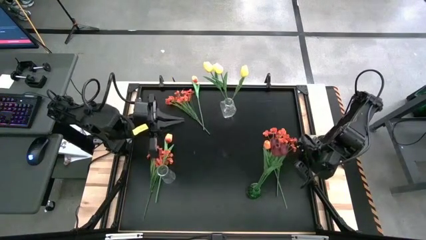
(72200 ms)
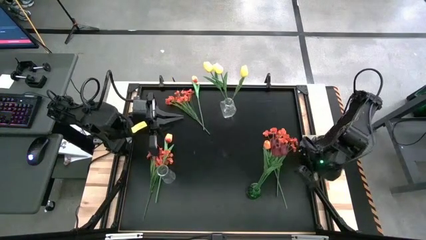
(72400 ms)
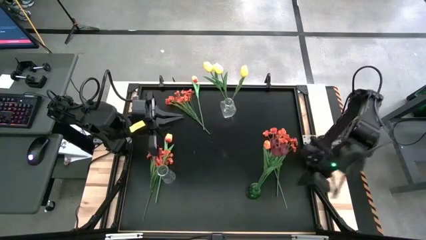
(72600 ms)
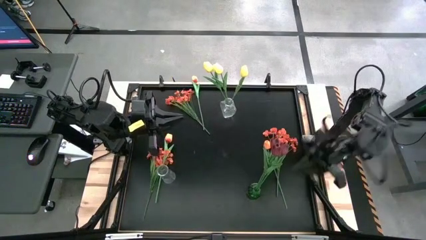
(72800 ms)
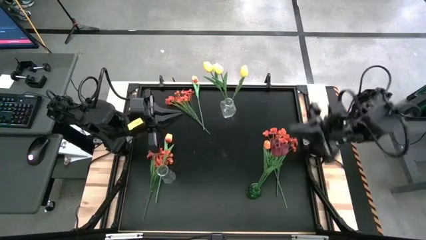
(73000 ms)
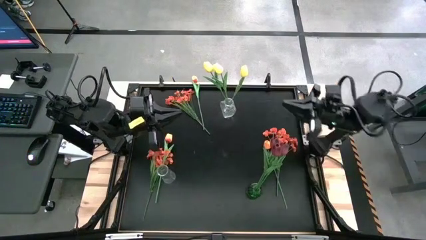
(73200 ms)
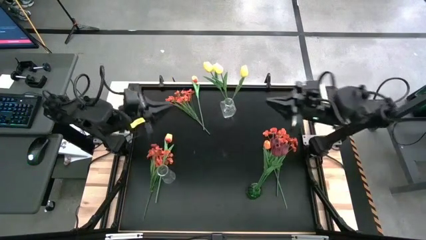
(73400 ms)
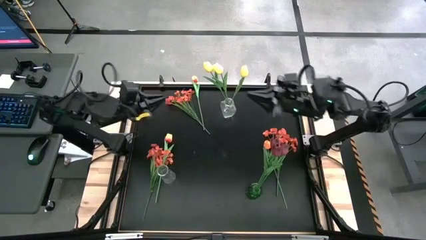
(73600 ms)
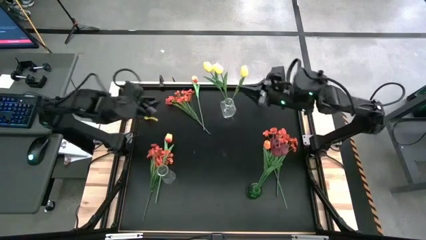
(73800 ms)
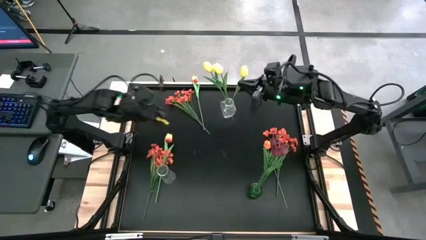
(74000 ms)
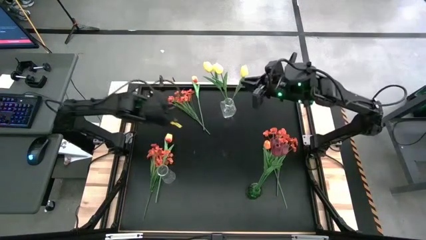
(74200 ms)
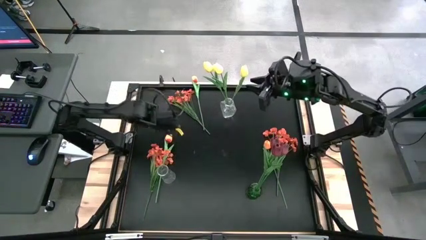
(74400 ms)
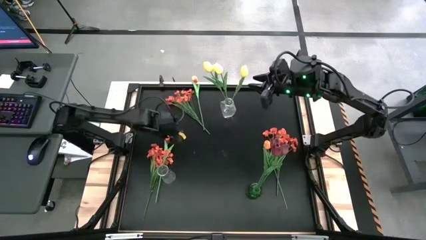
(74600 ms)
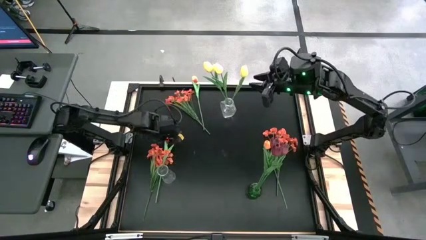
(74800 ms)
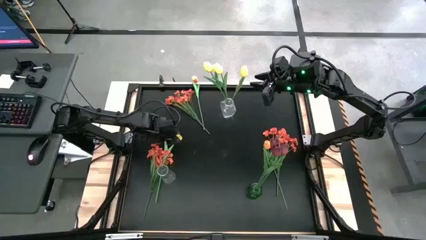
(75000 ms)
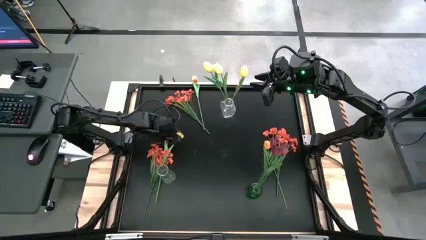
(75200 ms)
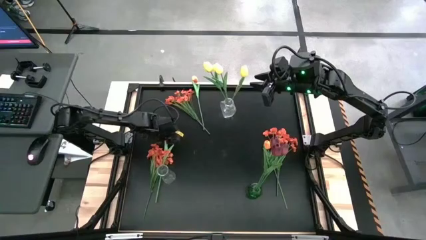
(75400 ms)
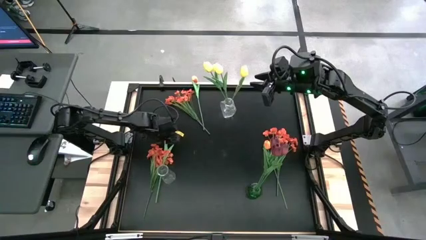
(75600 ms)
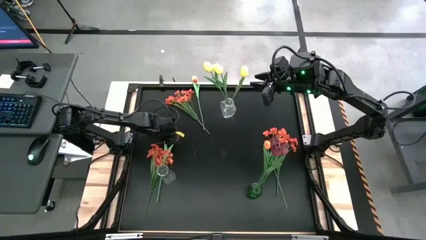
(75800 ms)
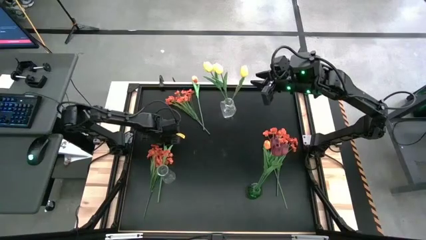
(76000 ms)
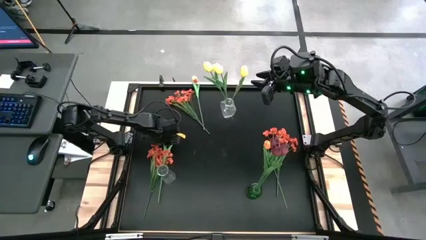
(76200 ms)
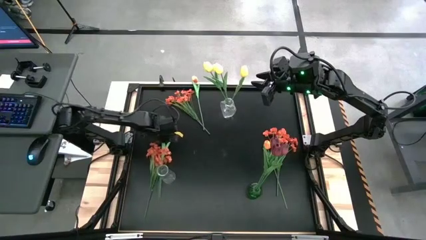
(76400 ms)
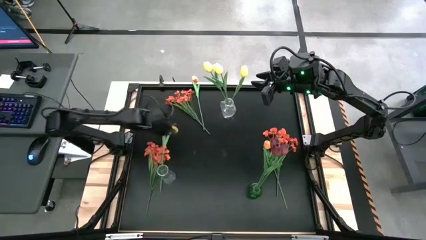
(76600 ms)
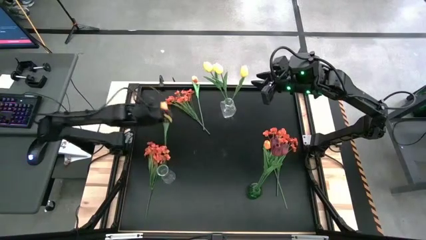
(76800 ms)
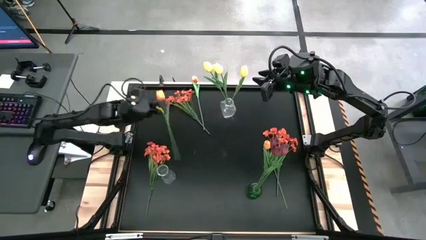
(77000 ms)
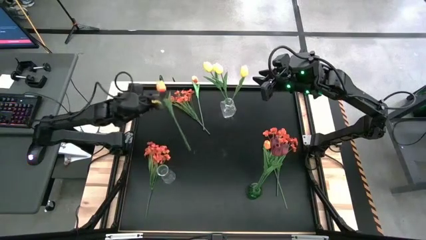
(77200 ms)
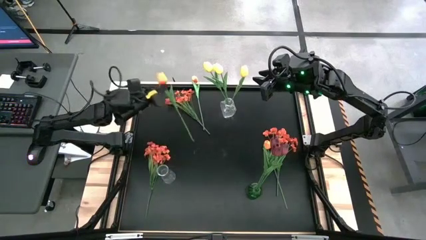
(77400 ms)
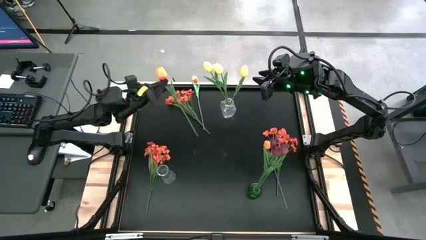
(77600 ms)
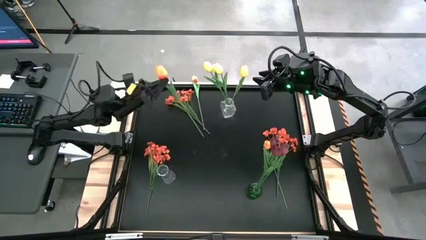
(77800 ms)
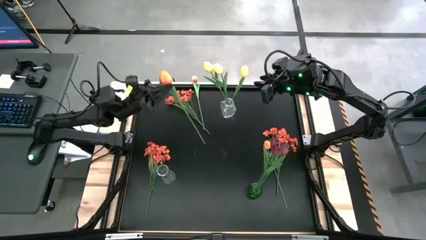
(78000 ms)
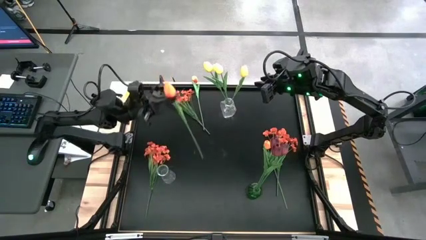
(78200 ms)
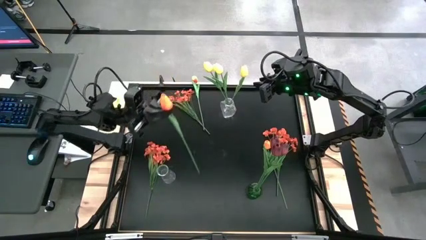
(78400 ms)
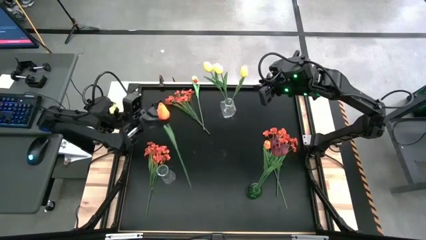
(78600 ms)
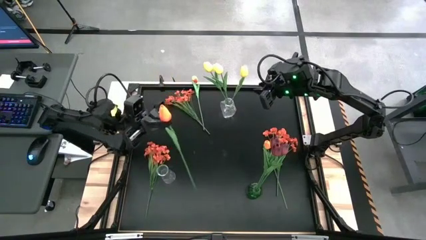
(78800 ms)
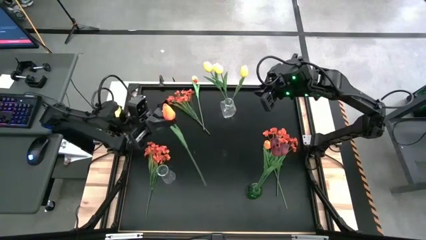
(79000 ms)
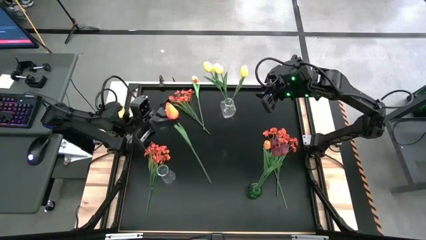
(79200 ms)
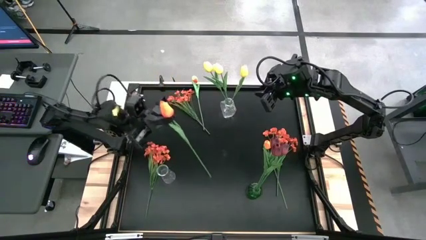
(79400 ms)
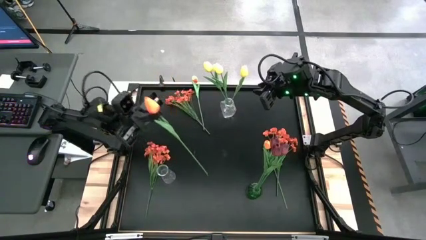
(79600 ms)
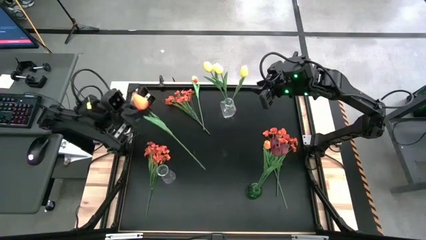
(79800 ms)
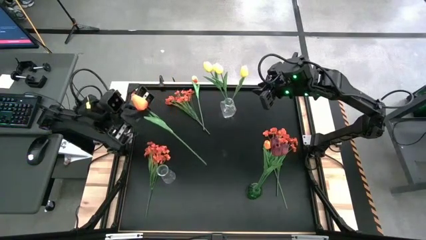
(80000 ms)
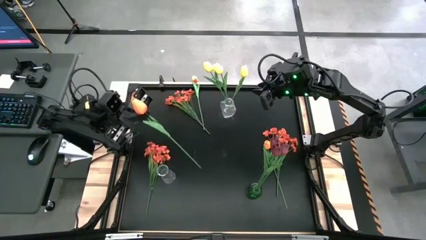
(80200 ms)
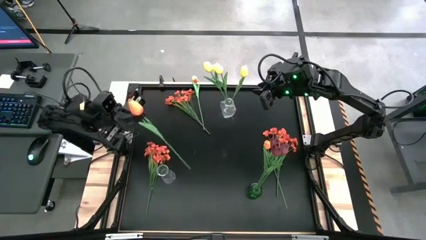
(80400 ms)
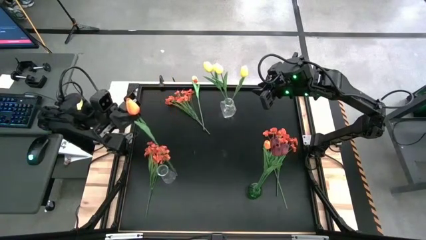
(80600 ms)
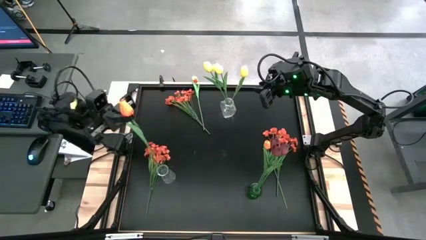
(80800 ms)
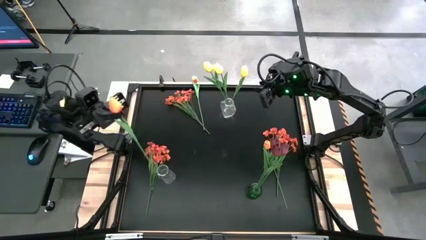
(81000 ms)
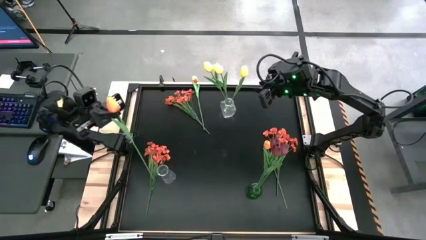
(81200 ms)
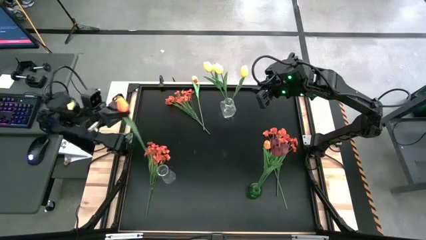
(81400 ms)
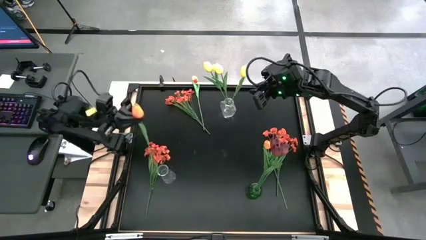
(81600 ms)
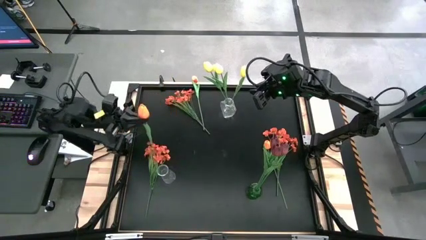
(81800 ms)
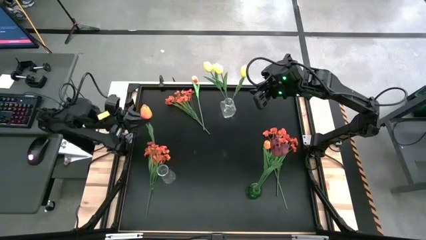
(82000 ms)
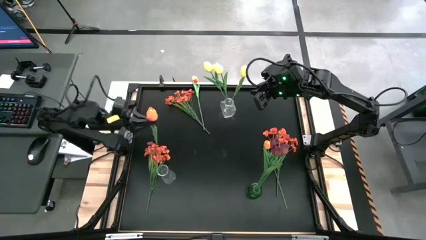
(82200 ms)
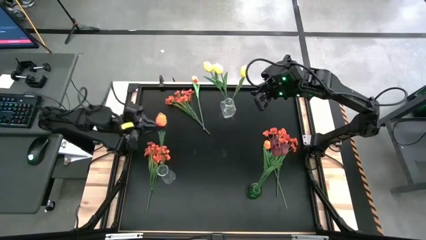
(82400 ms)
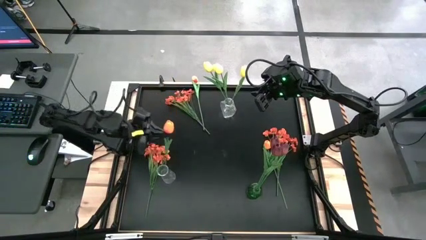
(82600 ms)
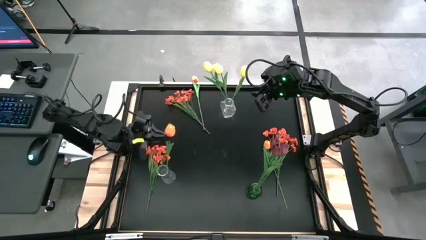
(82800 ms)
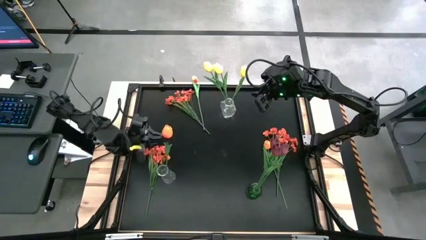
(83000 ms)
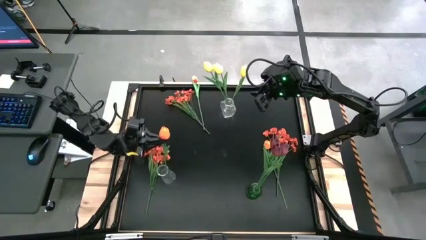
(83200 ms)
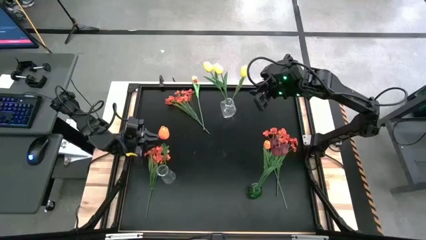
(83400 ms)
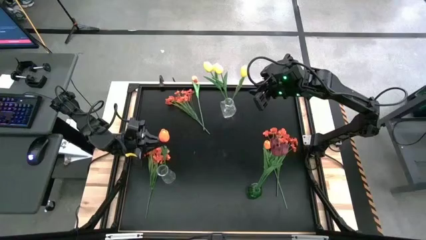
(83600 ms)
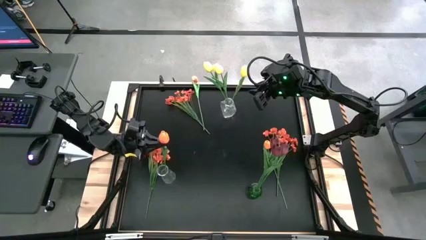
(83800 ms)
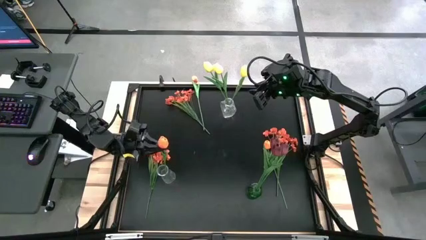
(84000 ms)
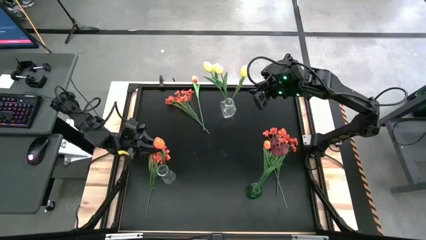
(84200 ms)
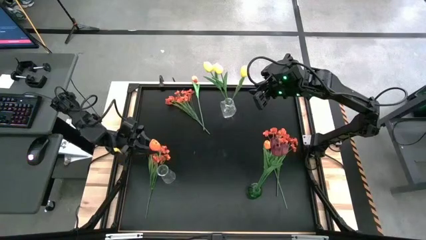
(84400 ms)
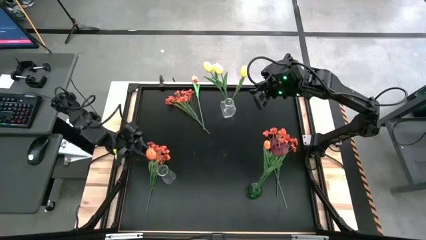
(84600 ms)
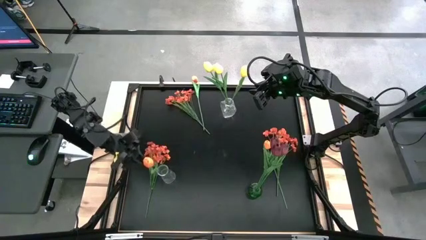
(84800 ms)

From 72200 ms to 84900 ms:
Task: Sort flowers into vase by color
Put the left orange tulip into the bottom transparent vase

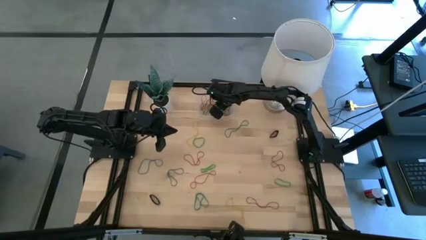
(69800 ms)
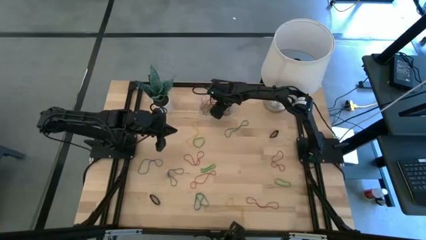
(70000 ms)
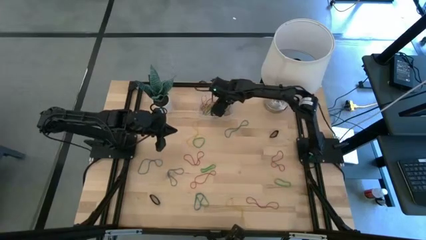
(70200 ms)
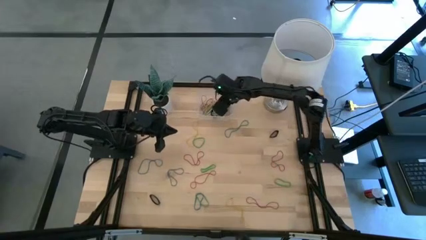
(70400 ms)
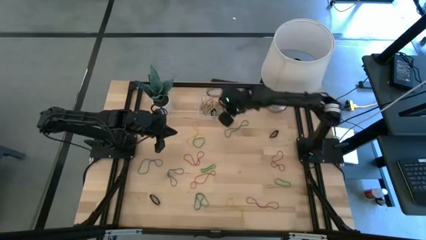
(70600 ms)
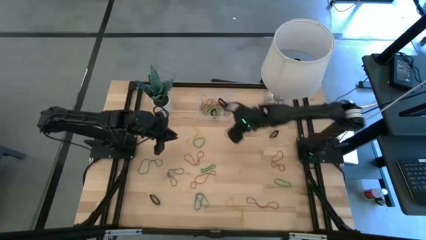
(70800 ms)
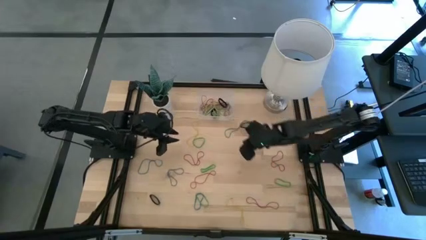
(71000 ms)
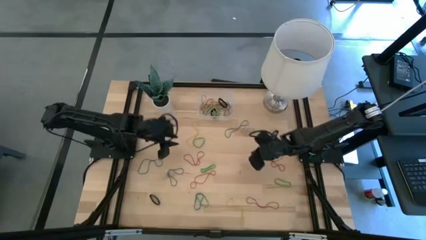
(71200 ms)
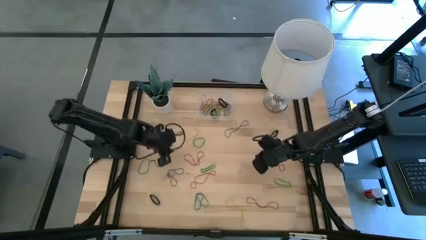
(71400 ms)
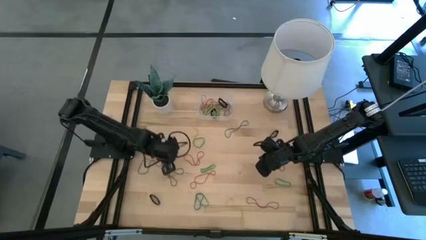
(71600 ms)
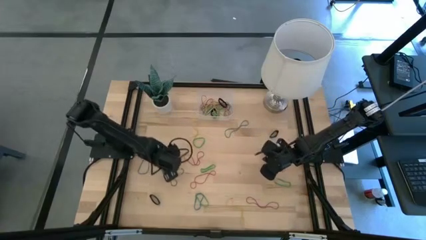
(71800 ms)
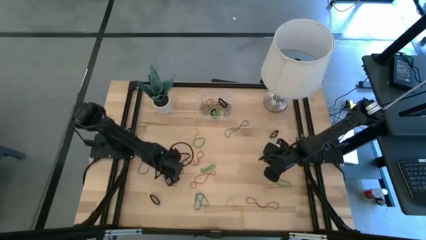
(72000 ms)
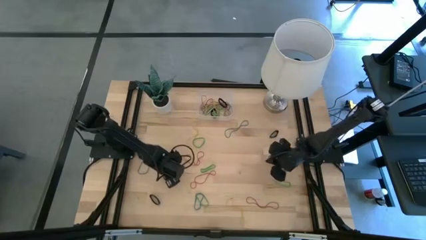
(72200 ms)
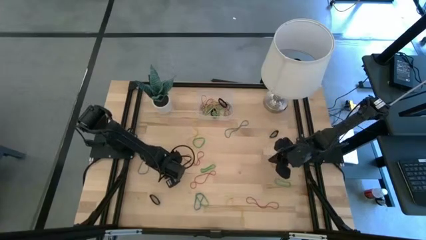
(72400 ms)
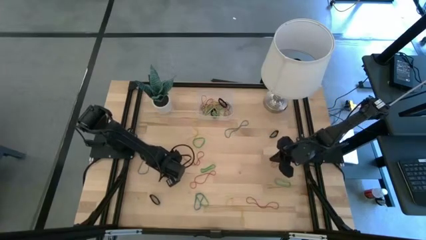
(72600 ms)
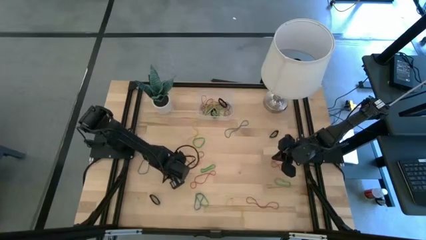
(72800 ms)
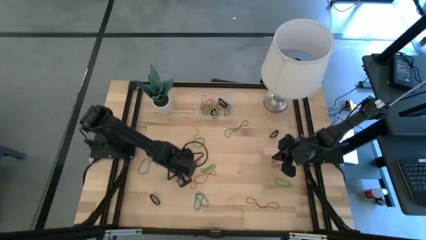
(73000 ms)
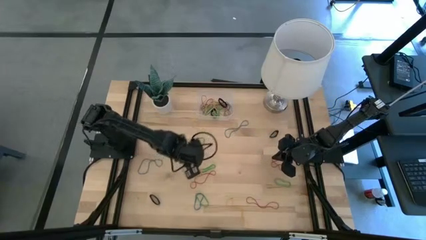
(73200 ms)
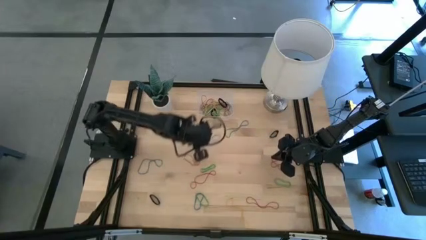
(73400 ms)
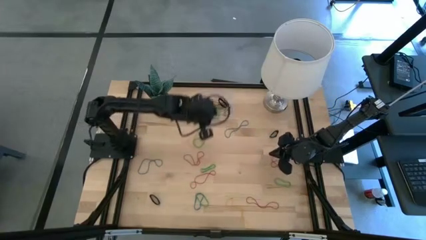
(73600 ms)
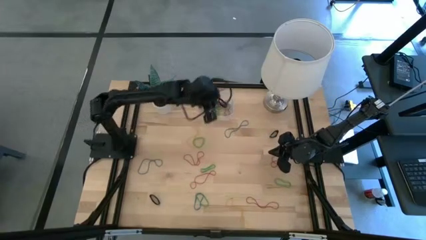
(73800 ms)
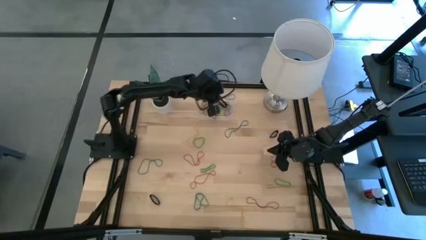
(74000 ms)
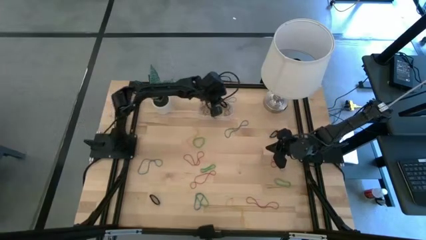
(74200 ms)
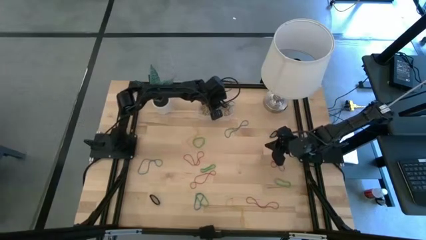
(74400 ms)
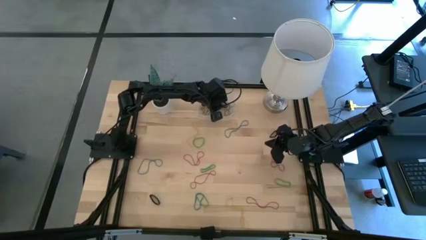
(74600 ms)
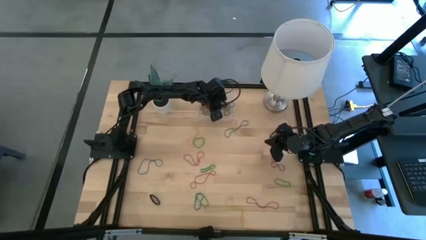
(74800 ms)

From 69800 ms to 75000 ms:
Task: Pick and place rubber bands into bin
Put the blue rubber band into the transparent bin
